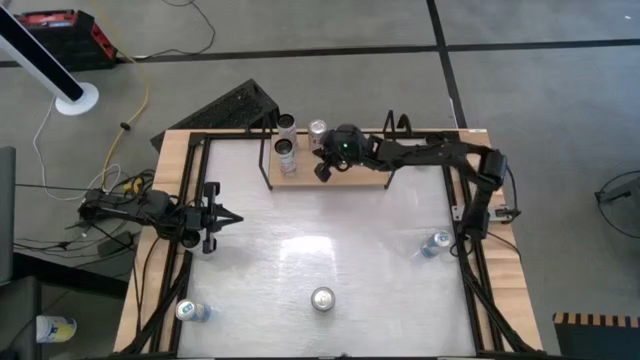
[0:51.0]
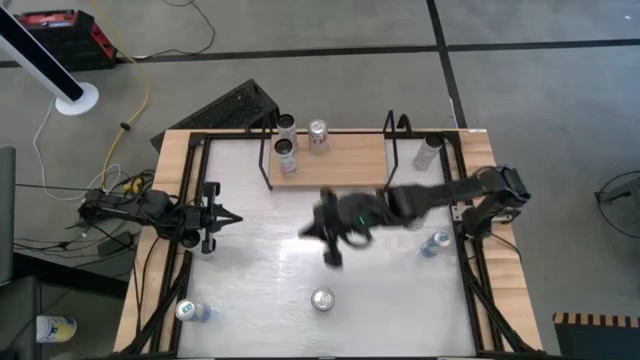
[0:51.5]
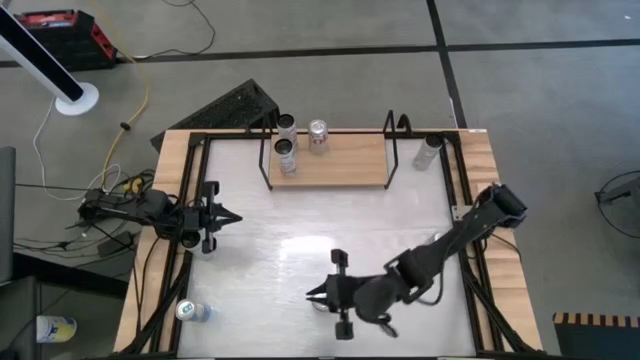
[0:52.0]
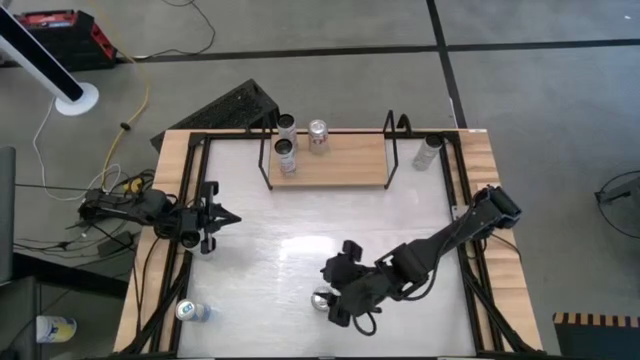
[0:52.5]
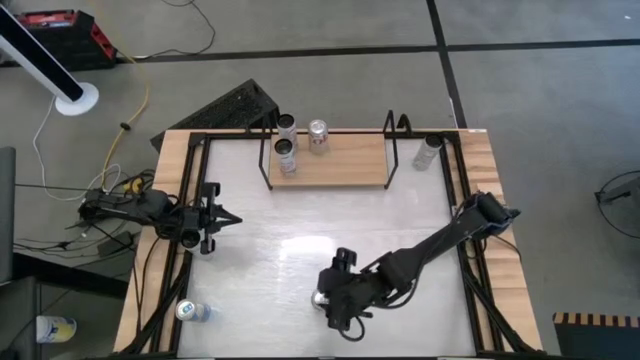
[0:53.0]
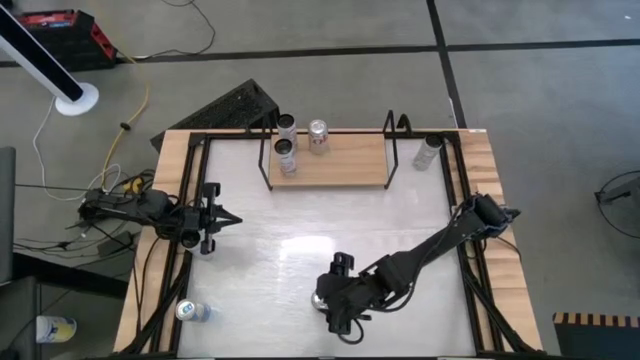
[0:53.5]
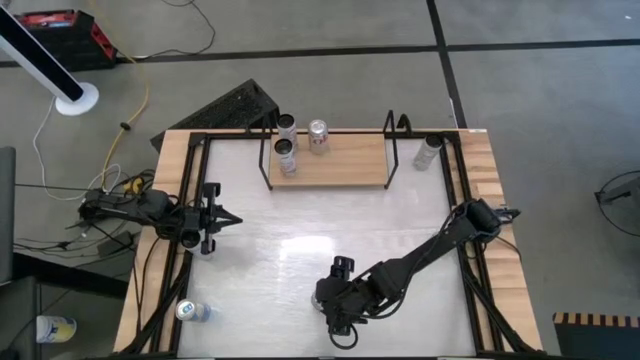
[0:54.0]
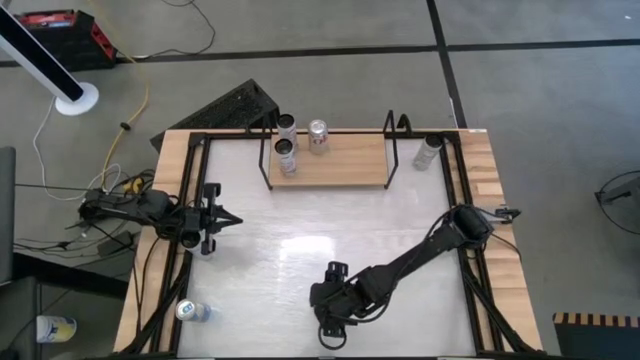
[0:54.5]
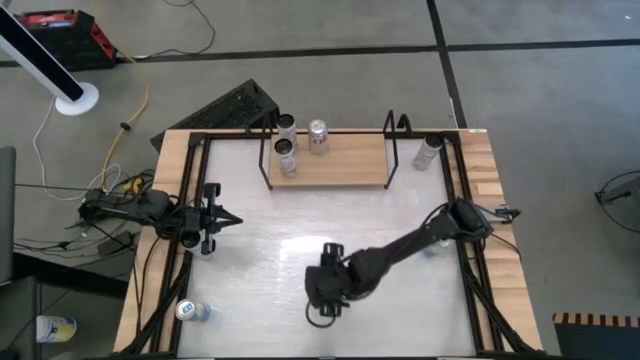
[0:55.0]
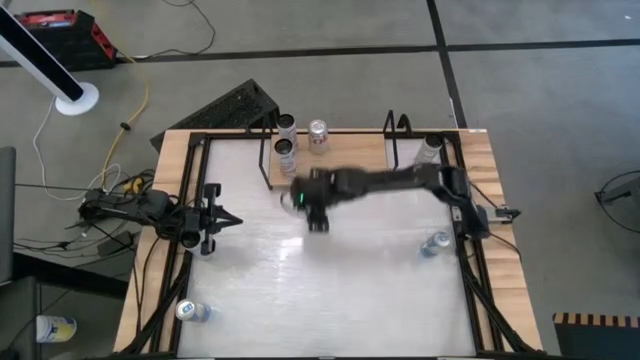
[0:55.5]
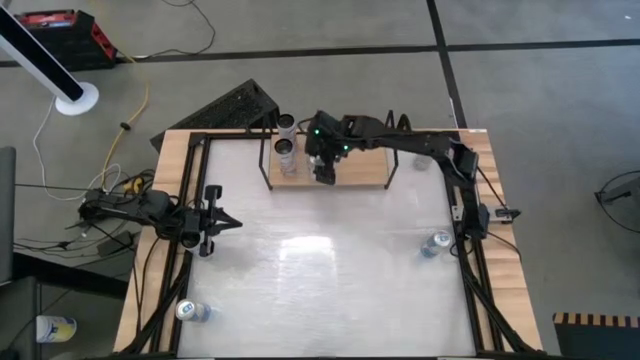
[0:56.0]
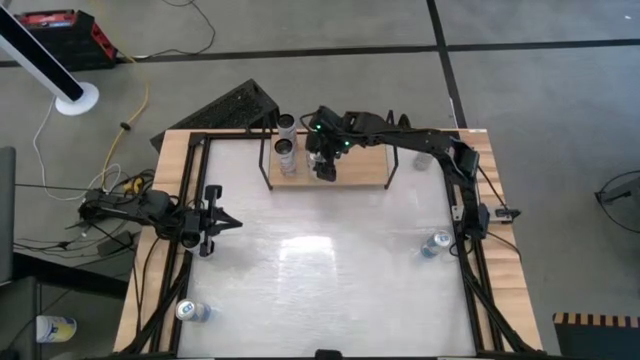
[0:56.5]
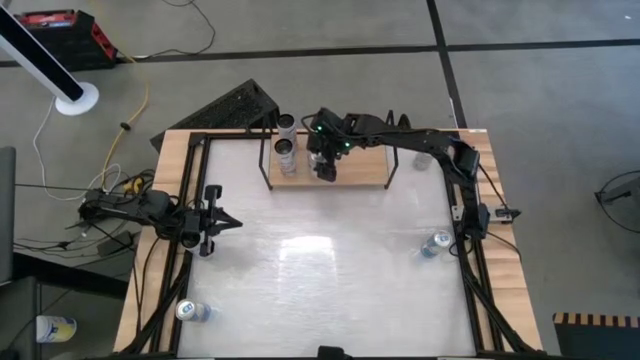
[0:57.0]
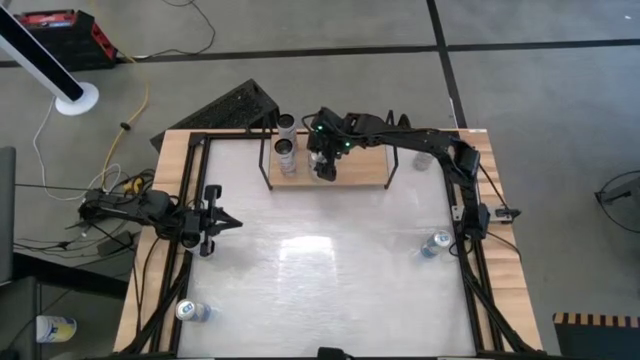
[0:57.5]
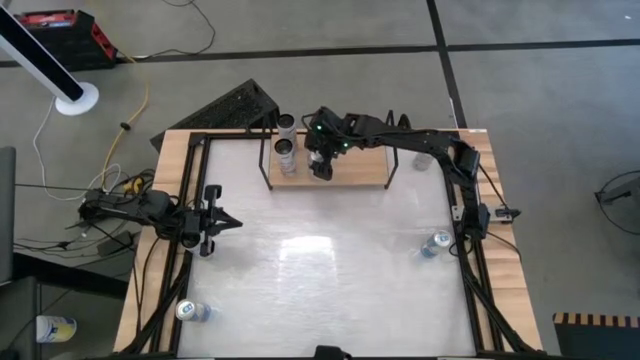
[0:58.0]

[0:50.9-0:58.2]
Task: Place canned beverage on shelf
Put the red-silver soda can on the shelf aligned with the other red-silver soda can

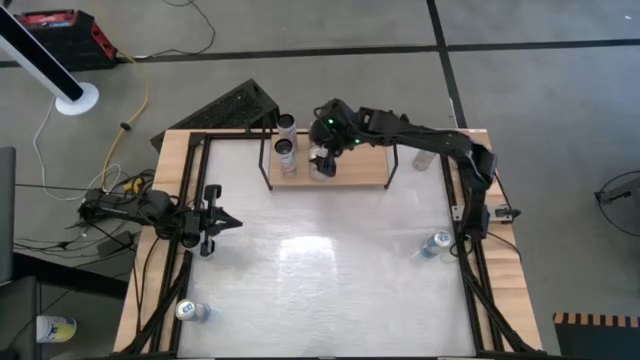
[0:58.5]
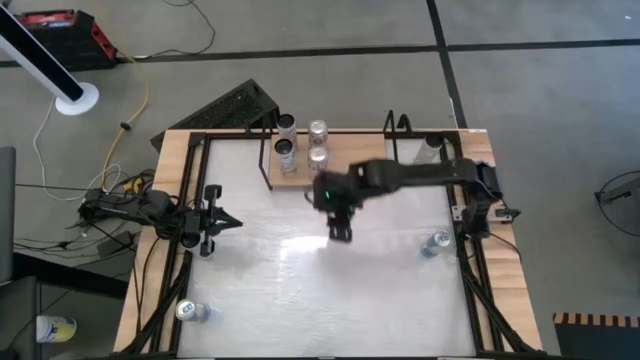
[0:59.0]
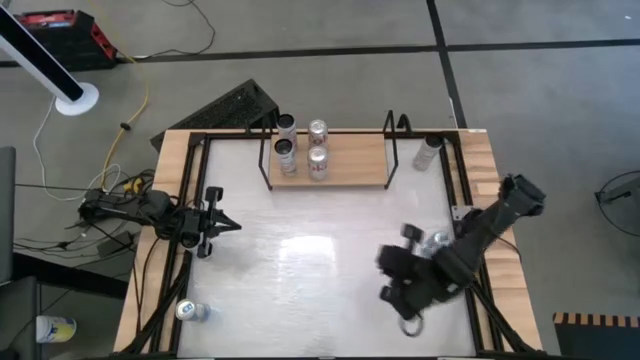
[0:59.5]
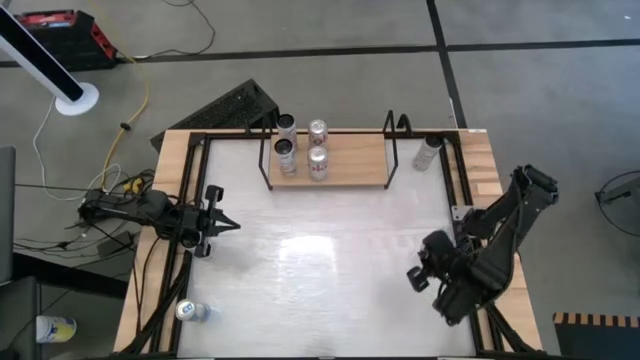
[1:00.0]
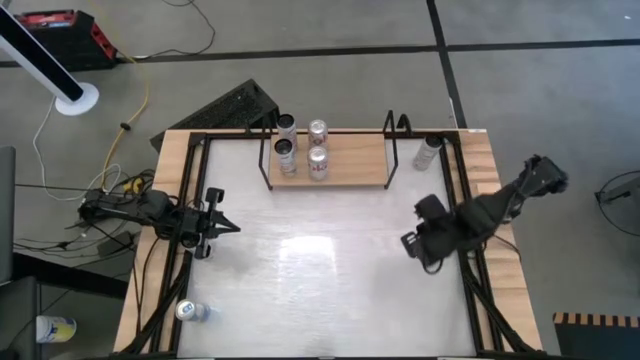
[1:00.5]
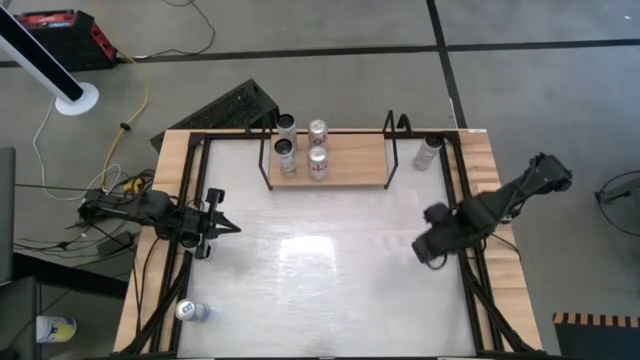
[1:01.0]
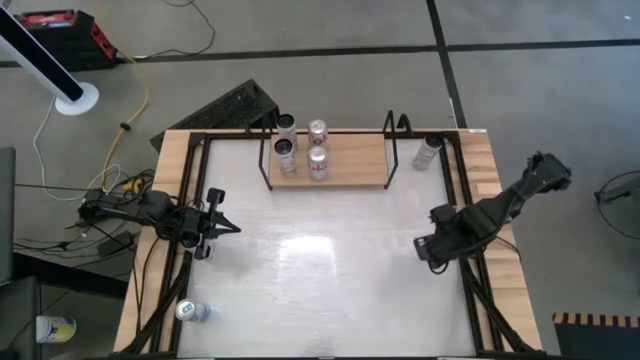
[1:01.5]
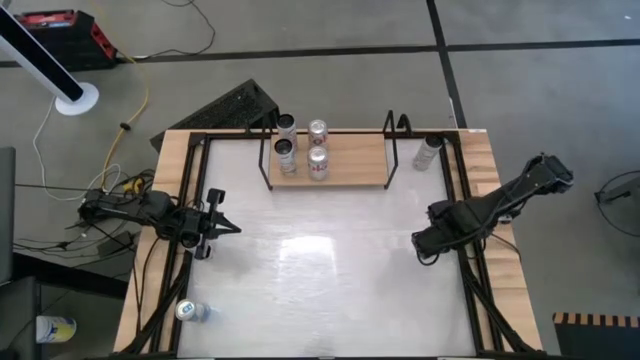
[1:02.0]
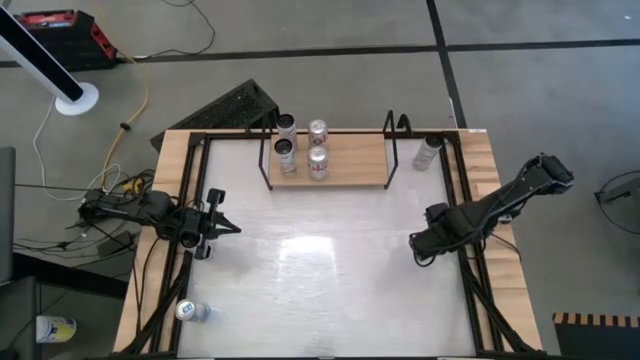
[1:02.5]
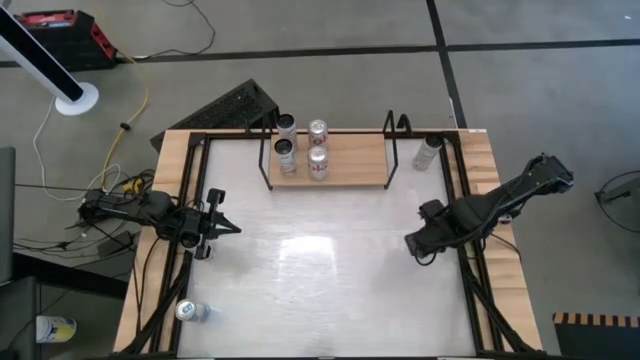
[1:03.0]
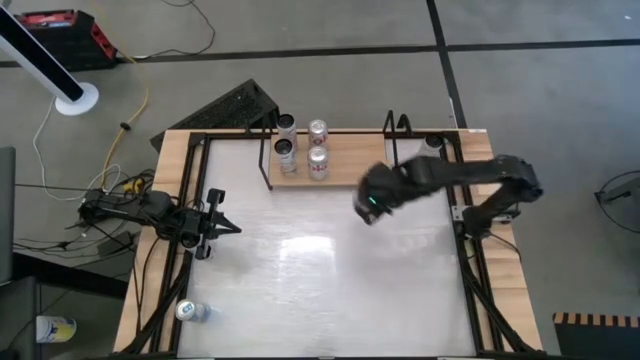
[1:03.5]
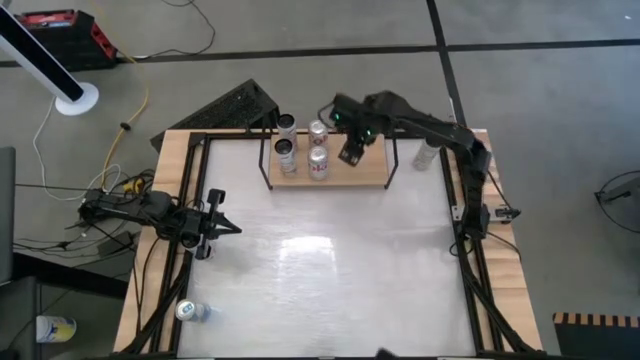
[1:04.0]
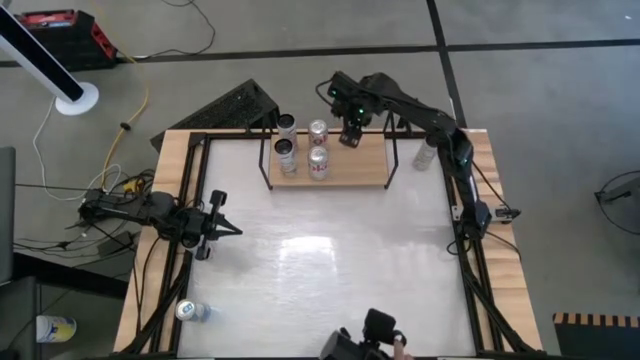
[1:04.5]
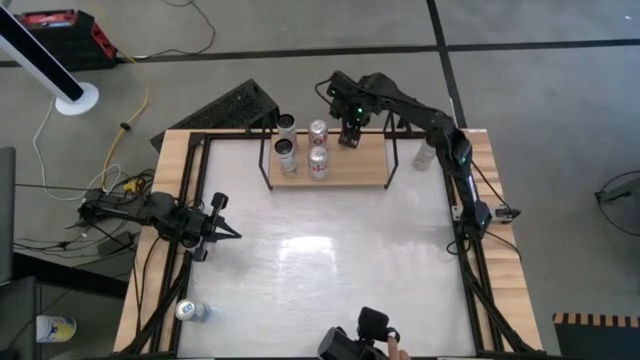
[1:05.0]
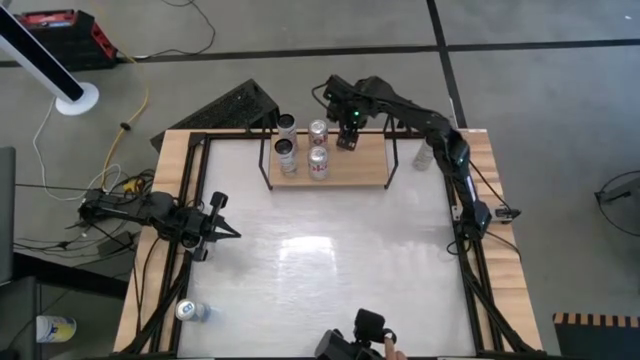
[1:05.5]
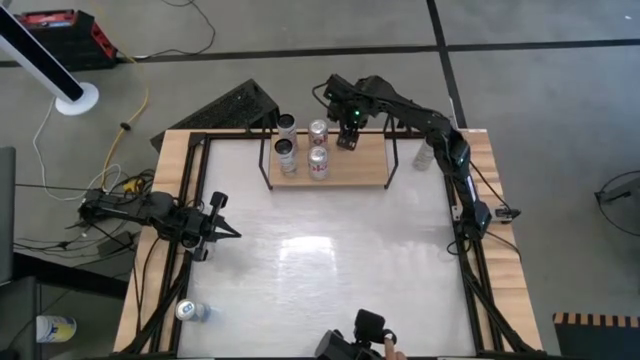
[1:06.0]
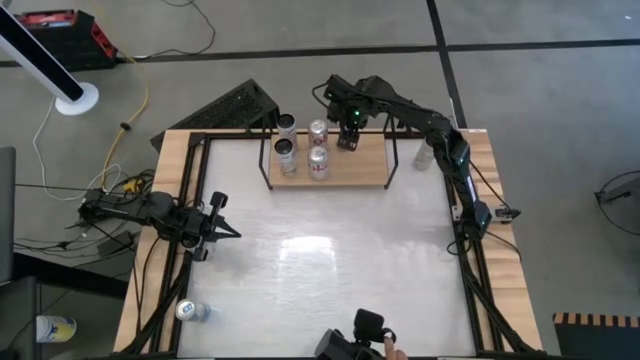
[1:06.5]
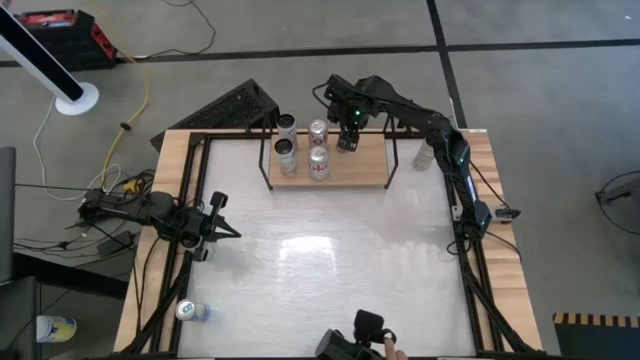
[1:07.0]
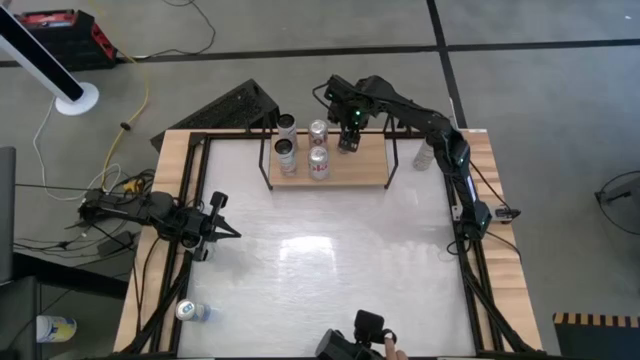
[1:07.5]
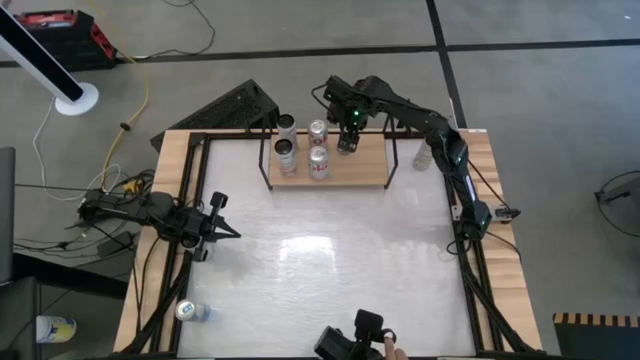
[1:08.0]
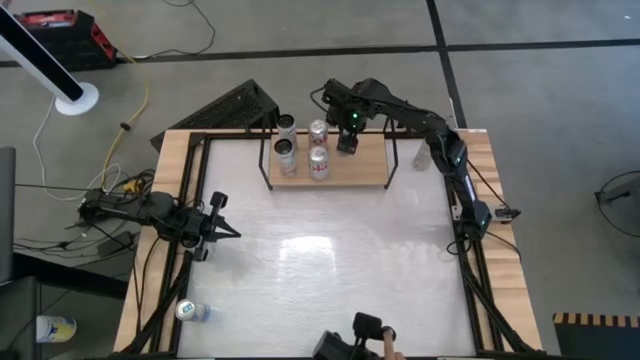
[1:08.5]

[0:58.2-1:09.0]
Put the right blue soda can on the shelf

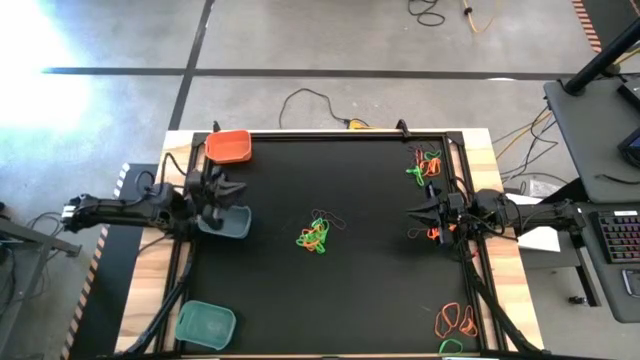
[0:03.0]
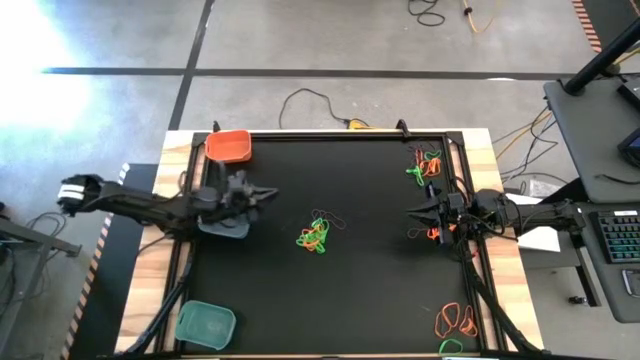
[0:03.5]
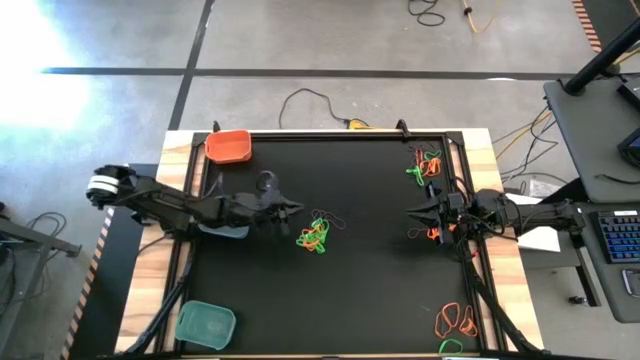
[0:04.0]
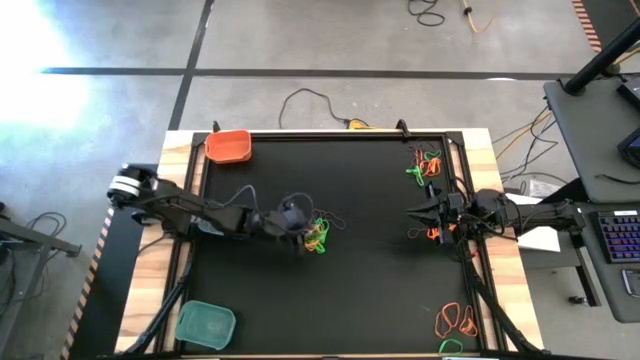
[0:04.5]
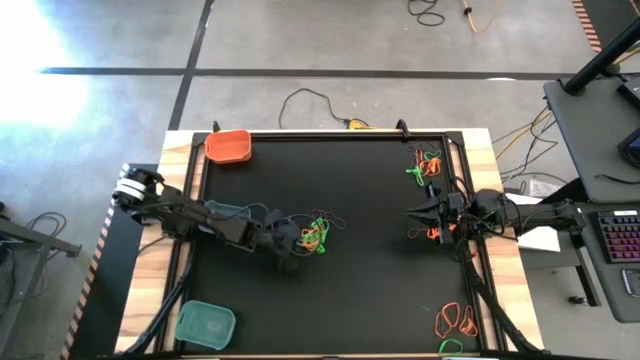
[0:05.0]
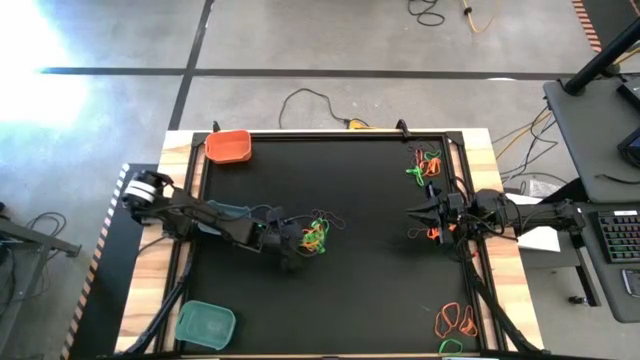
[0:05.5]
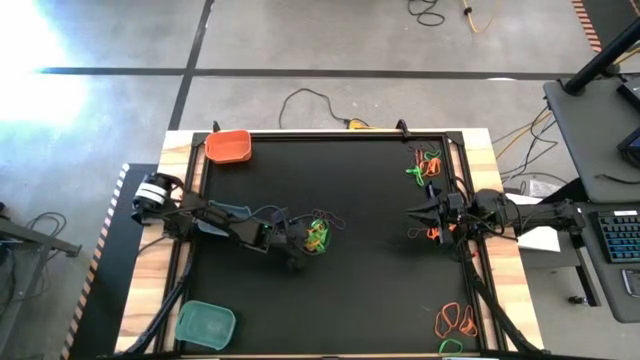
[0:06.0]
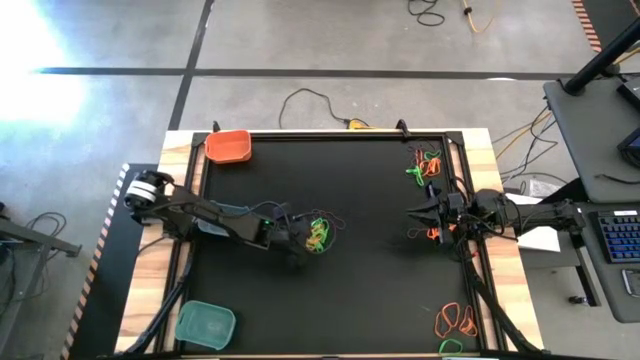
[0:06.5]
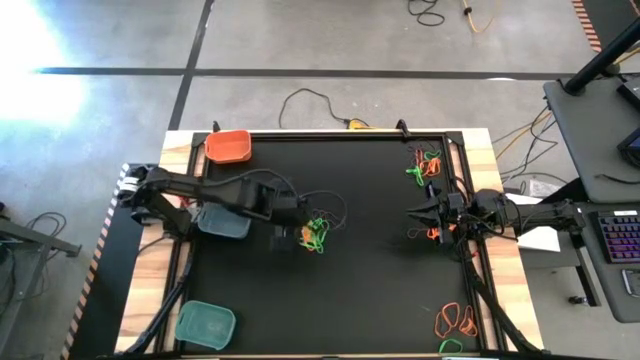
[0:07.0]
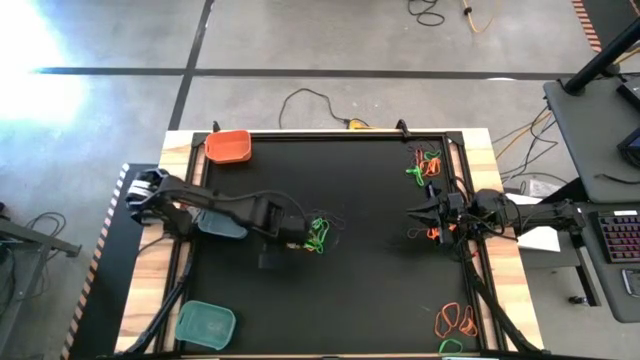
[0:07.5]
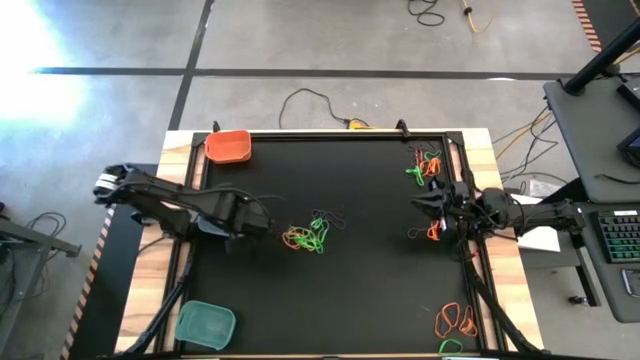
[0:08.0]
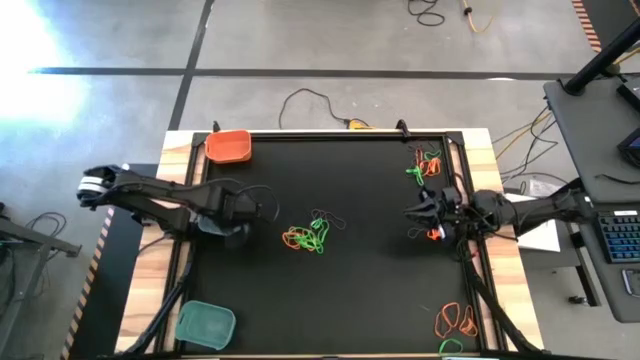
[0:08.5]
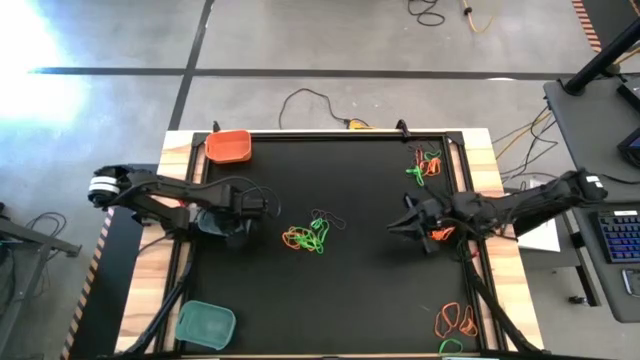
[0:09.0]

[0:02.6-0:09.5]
Task: Sort rubber bands into baskets
Put the green rubber band into the blue bin
